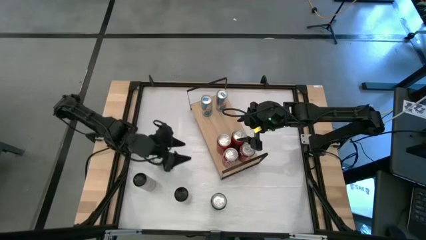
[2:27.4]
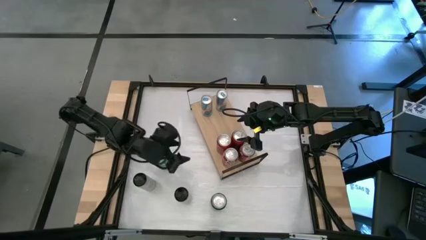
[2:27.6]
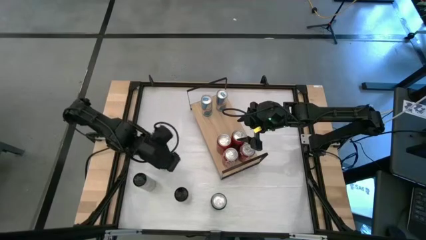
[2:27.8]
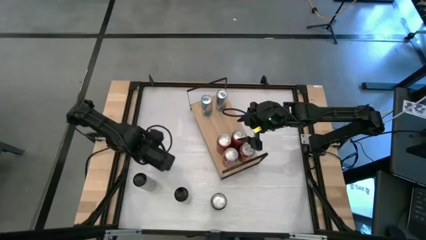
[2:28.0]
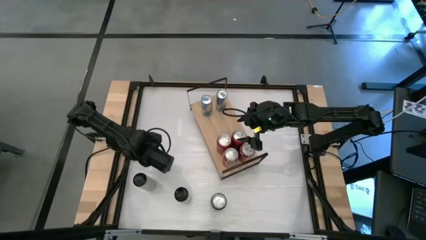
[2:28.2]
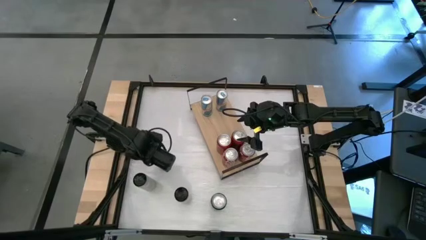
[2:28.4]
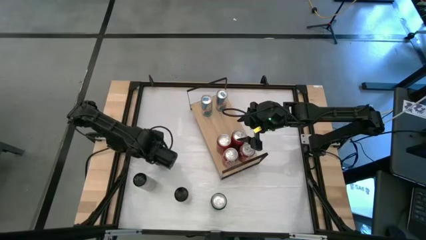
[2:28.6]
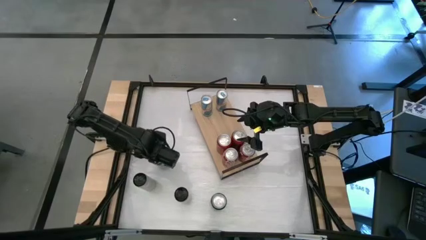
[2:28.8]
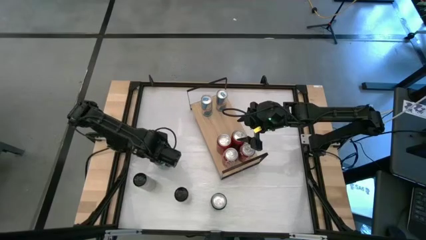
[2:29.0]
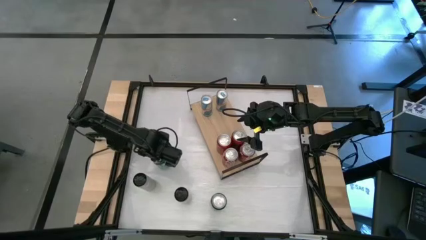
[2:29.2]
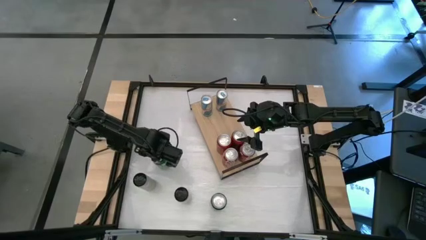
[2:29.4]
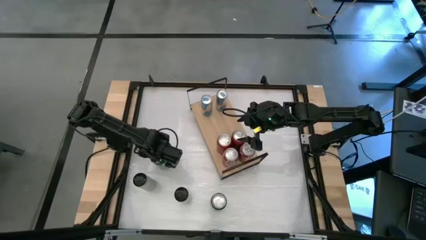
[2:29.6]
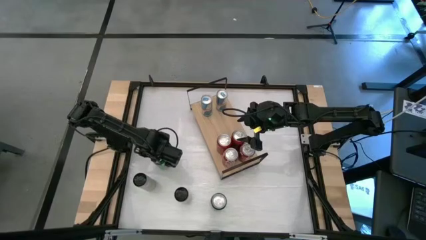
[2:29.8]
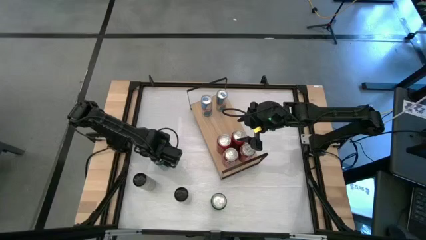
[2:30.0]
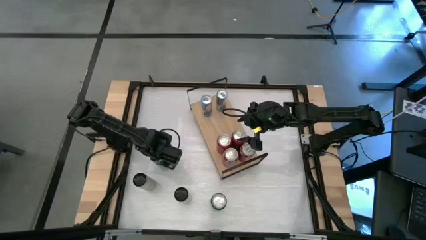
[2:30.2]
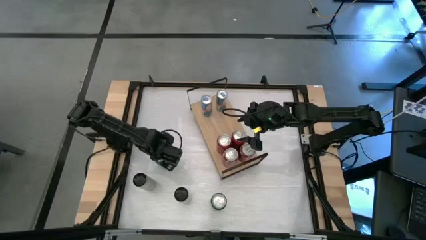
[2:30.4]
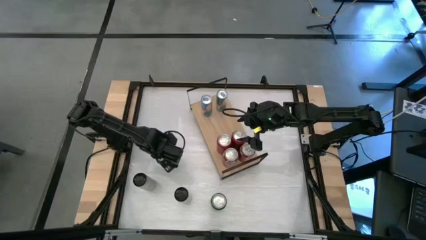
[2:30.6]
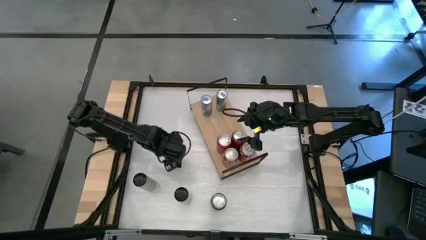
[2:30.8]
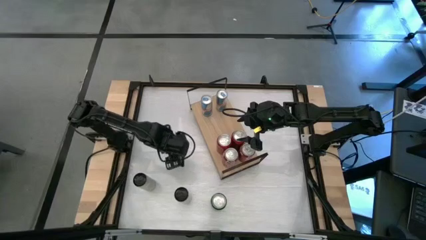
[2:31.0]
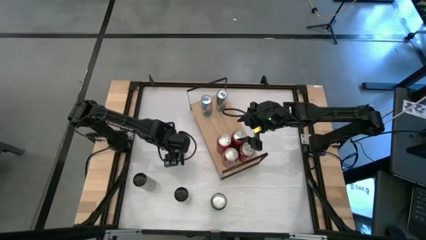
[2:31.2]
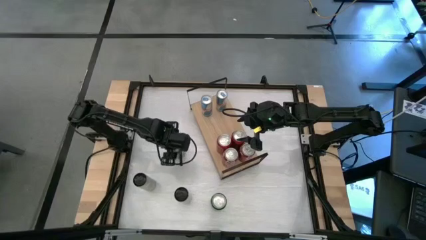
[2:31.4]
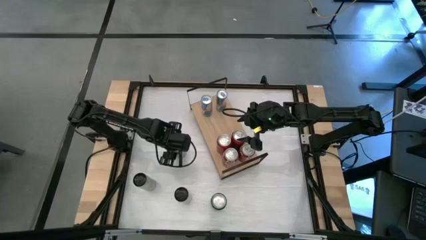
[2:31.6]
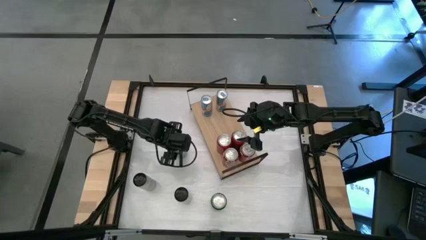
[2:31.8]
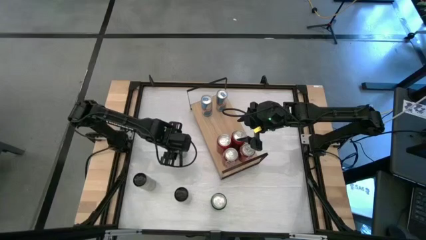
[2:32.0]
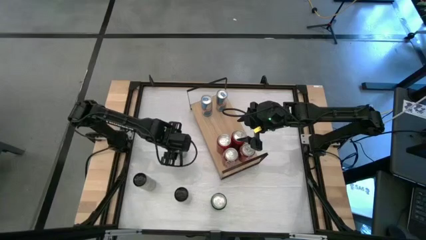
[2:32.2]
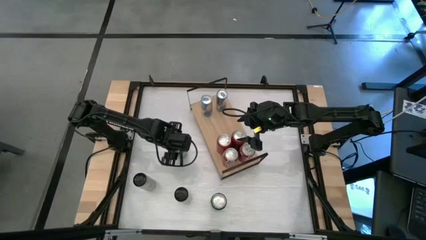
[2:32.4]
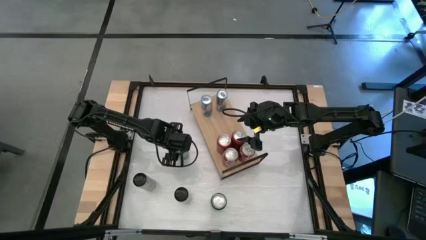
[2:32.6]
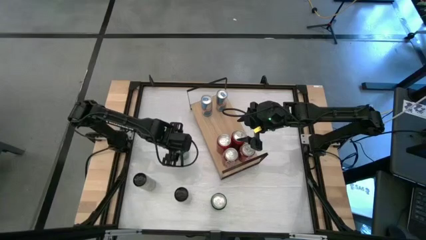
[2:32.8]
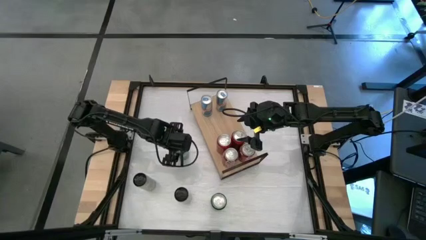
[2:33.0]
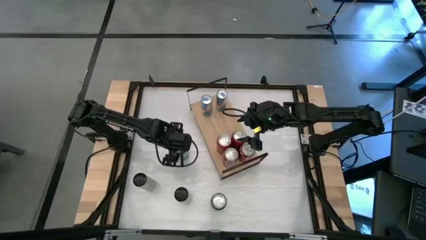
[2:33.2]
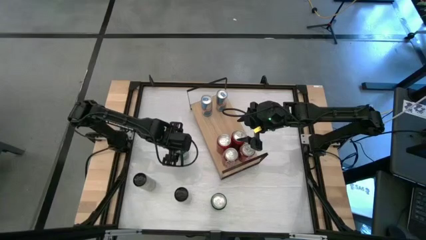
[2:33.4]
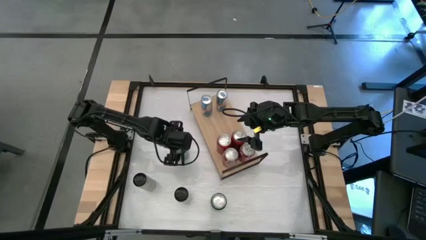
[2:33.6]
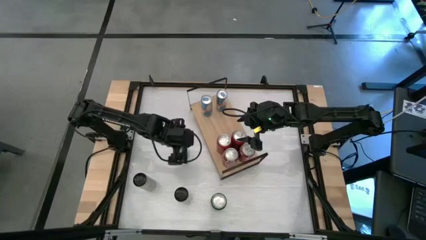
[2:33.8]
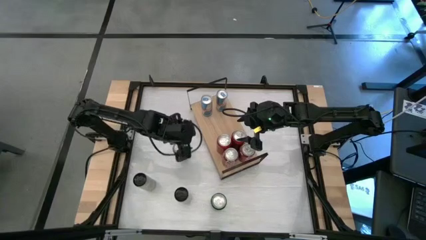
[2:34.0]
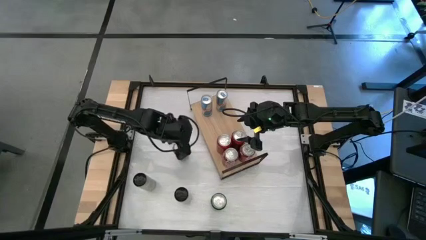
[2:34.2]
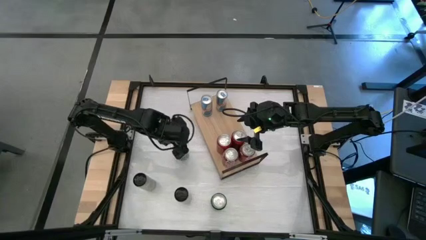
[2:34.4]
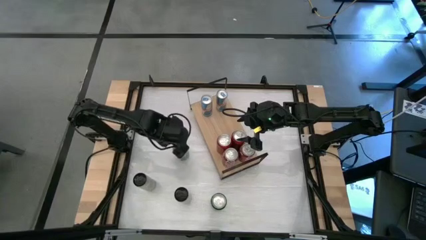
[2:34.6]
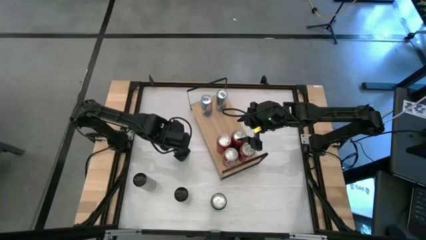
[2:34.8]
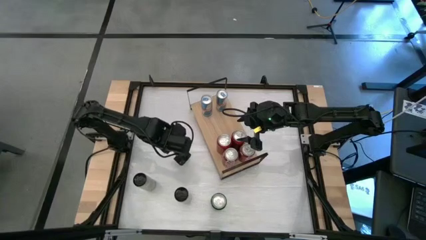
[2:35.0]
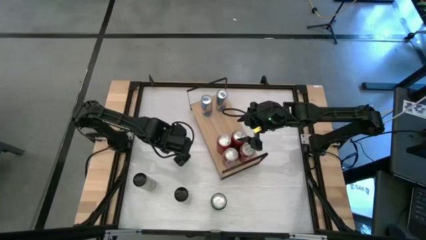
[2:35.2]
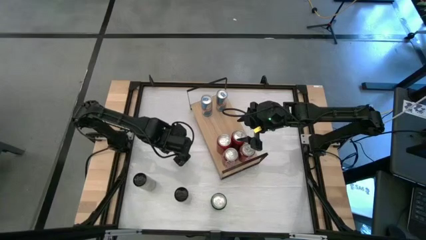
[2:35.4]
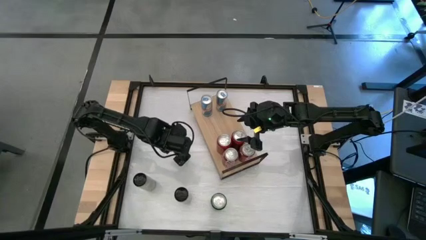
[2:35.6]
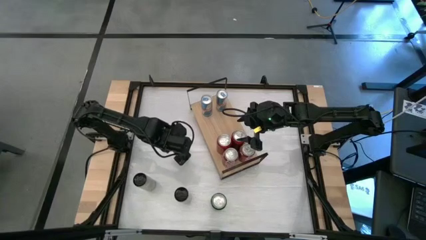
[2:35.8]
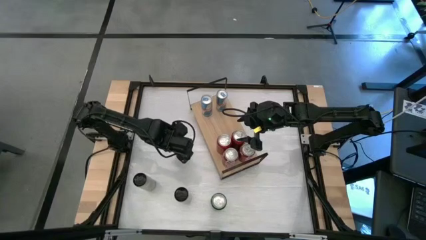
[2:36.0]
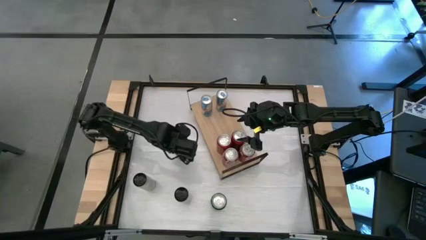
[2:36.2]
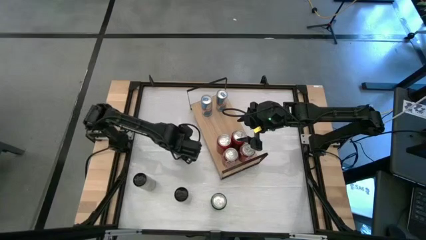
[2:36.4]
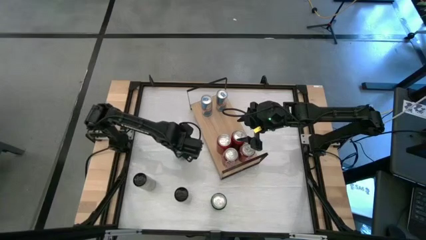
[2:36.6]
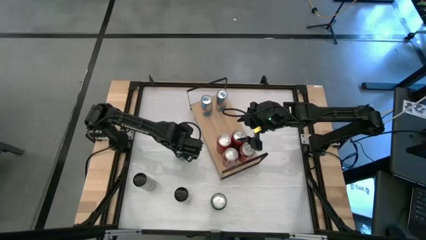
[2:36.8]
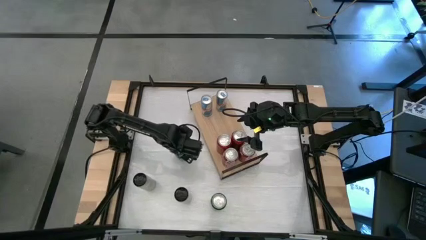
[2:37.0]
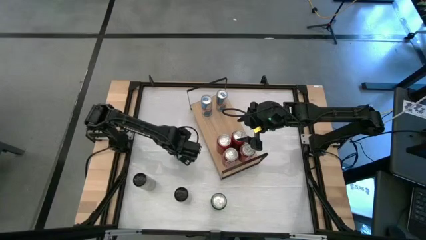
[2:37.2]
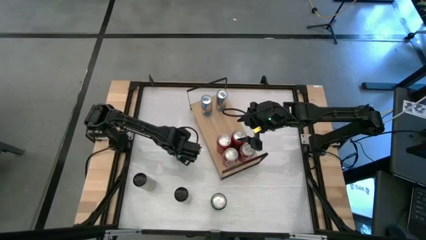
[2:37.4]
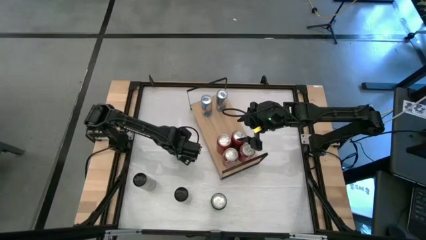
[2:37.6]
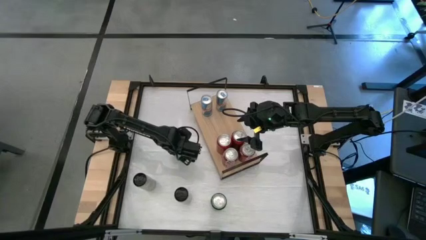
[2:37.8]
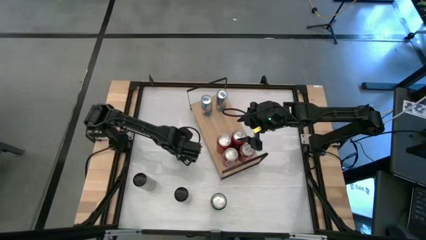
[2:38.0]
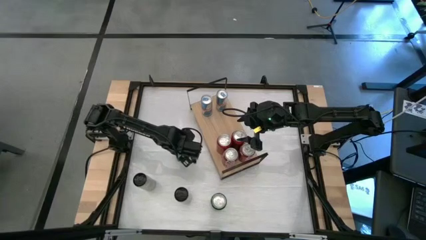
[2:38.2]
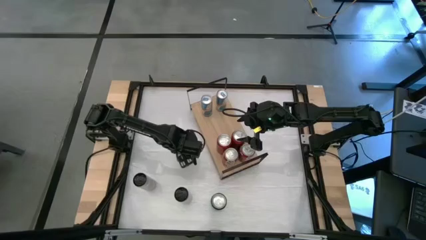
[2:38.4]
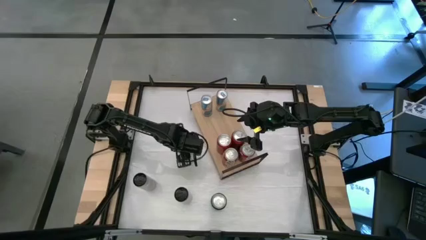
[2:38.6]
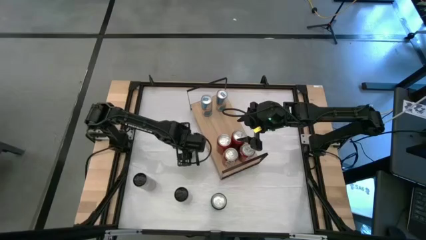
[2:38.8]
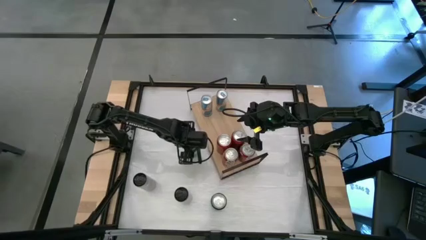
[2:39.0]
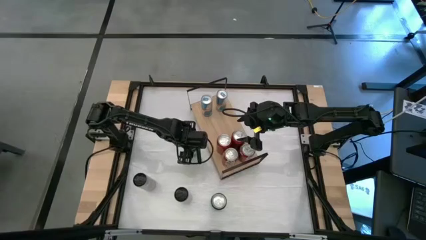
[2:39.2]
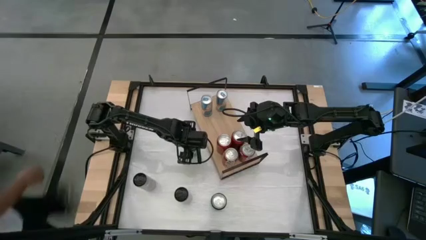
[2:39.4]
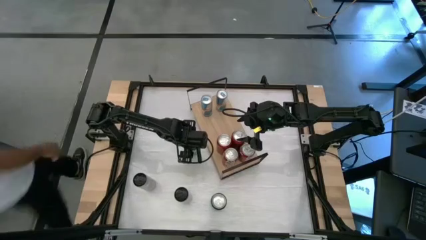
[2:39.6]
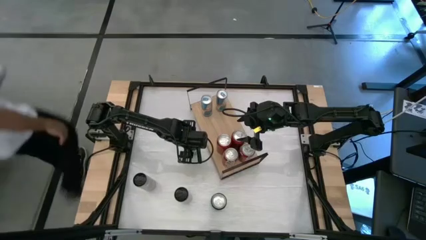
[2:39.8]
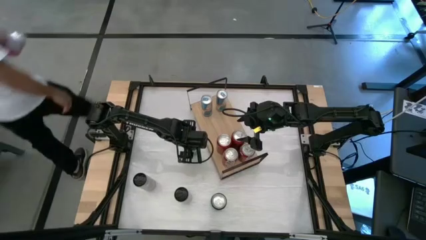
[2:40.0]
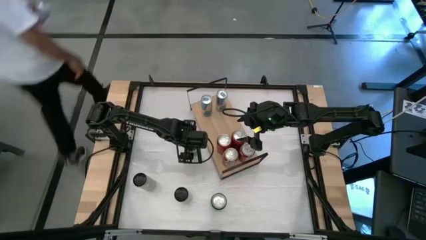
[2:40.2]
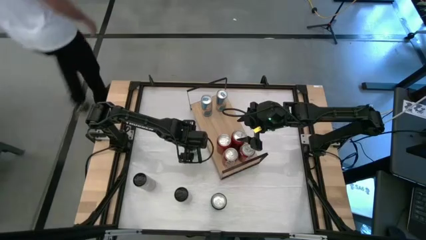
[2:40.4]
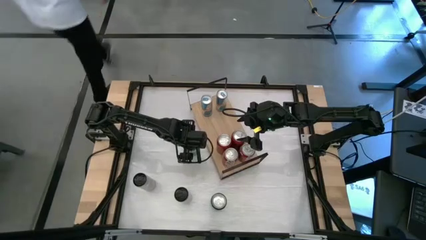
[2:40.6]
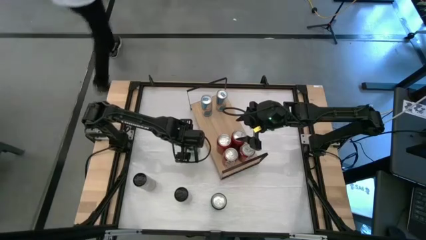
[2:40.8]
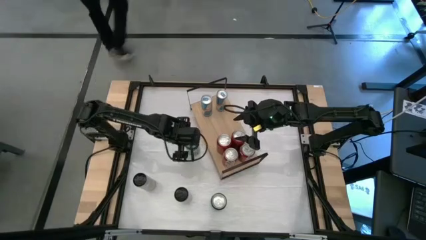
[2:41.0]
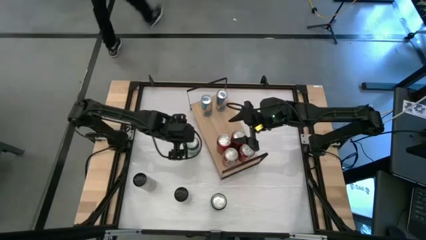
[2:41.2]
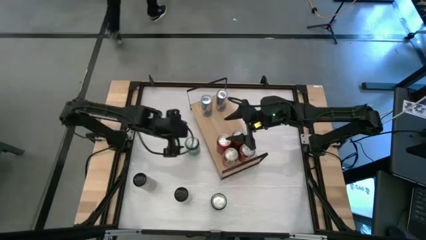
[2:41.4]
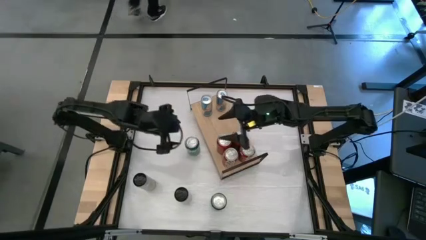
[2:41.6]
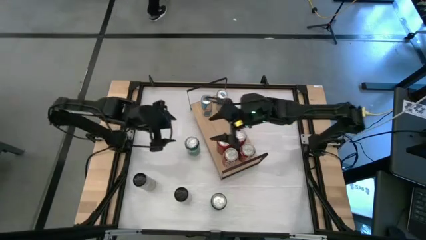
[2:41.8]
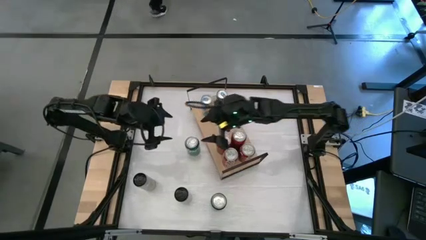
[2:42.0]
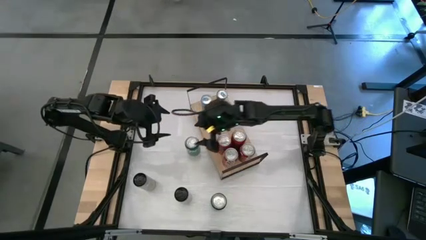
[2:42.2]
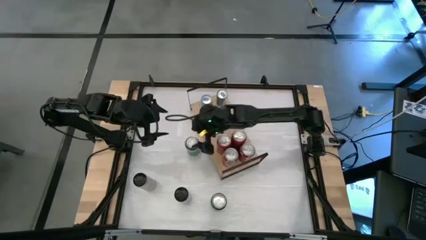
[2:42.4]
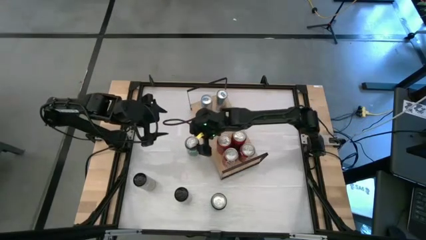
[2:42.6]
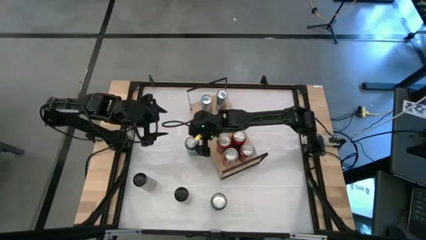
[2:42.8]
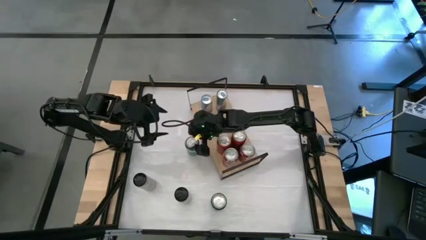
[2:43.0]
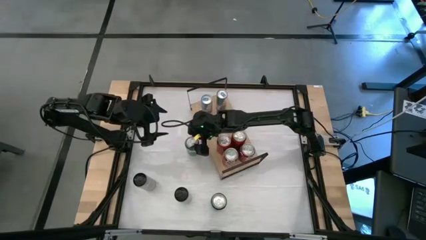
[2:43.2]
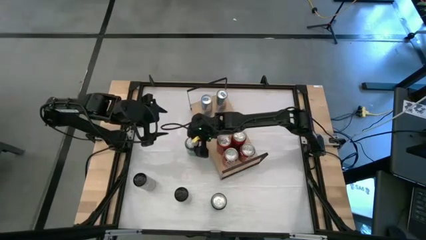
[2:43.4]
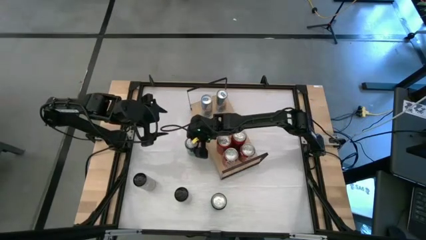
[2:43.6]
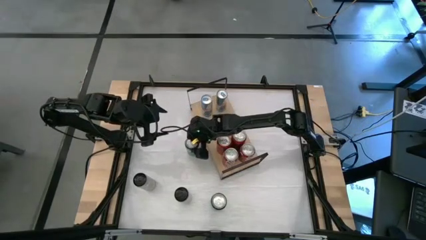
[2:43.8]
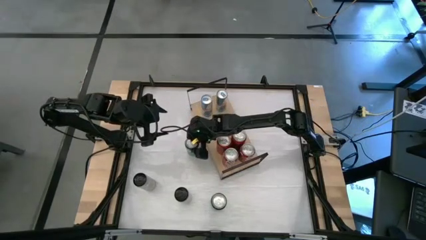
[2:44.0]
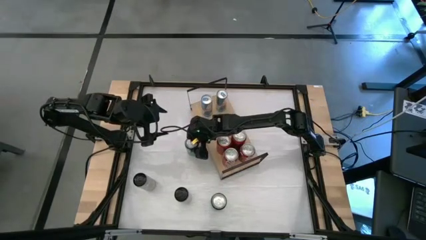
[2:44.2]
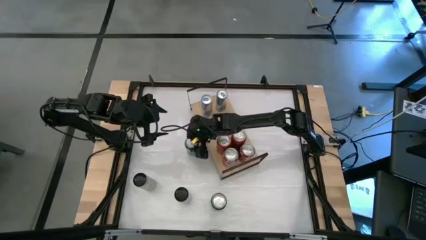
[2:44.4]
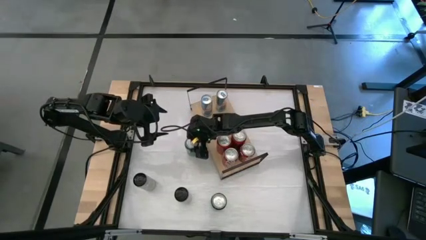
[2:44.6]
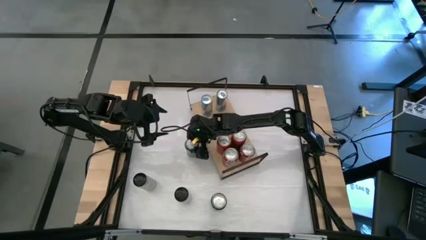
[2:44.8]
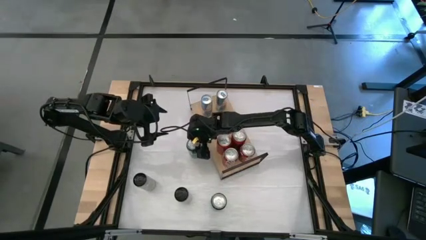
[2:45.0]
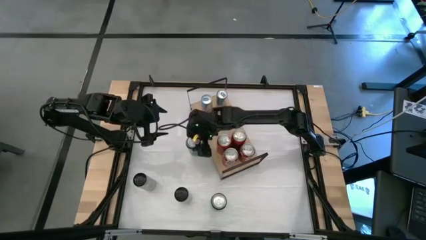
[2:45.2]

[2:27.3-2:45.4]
Task: Place canned beverage on shelf
Put the left green soda can on the shelf
